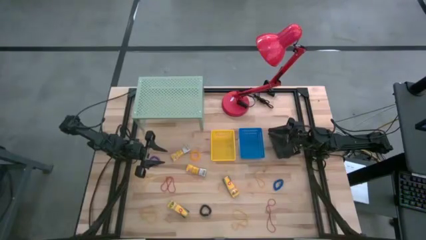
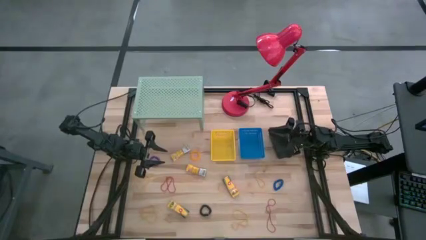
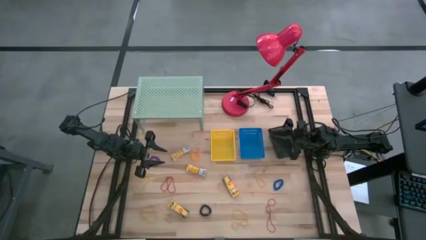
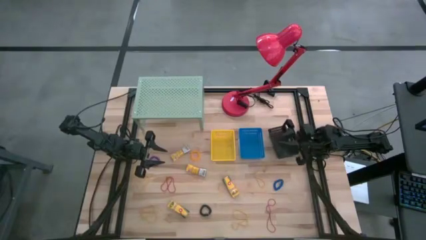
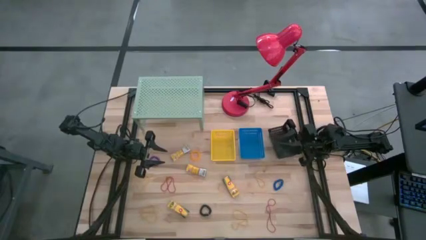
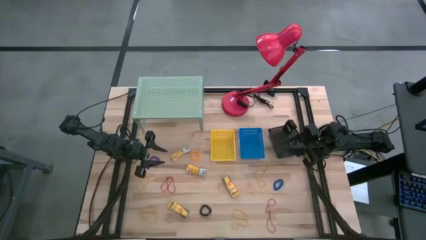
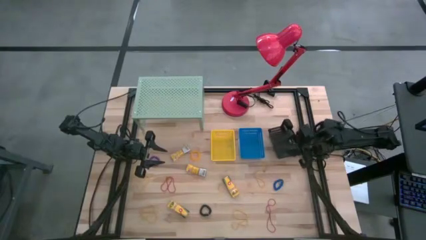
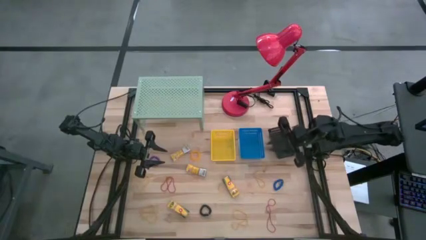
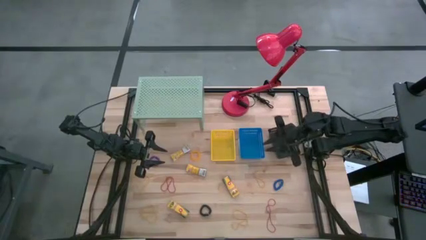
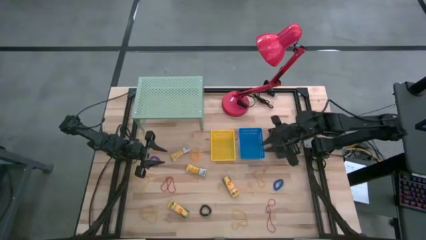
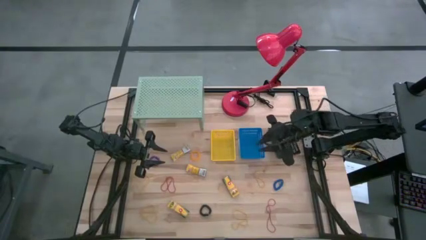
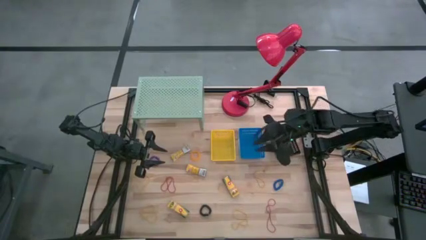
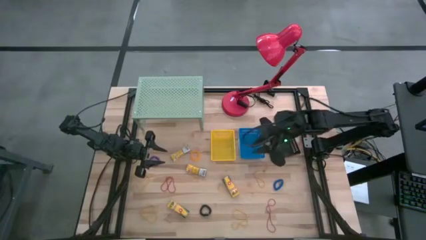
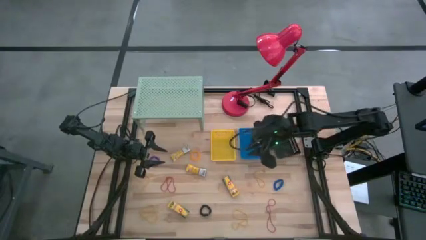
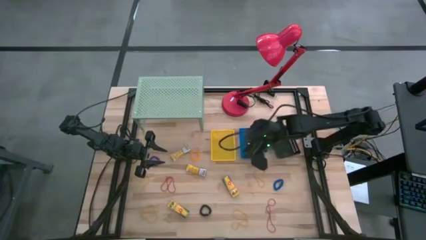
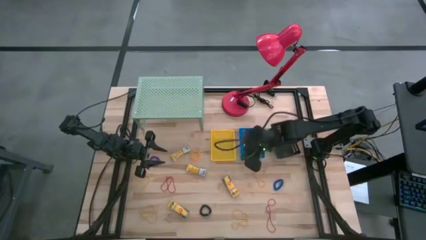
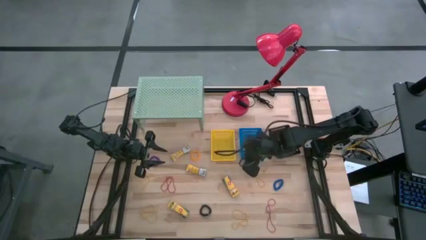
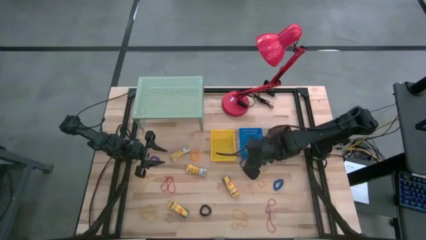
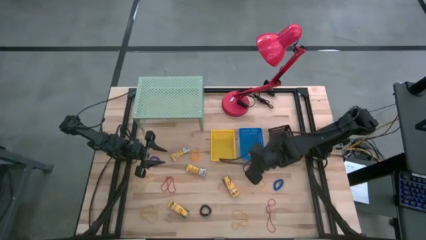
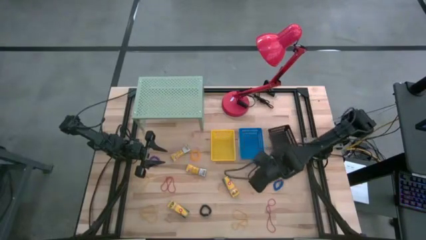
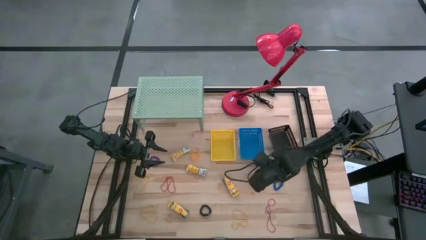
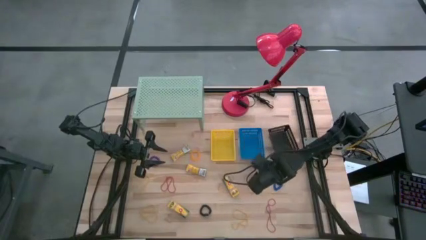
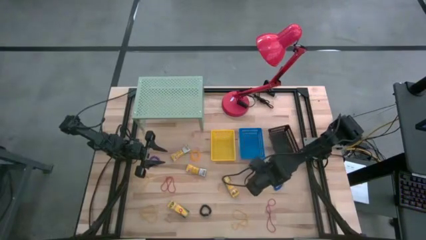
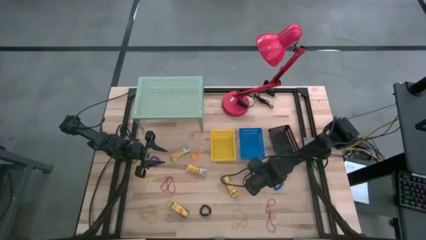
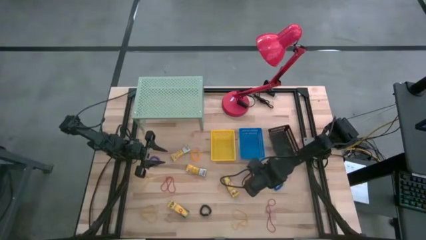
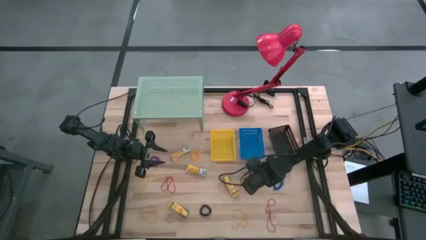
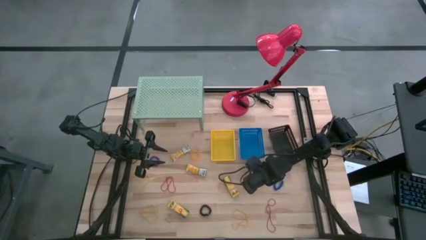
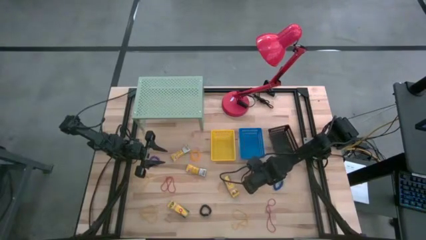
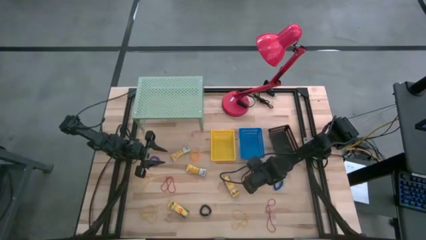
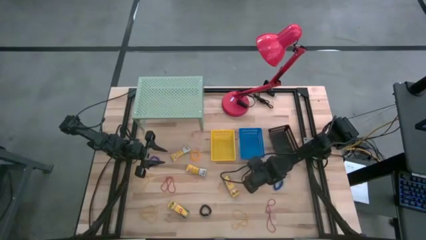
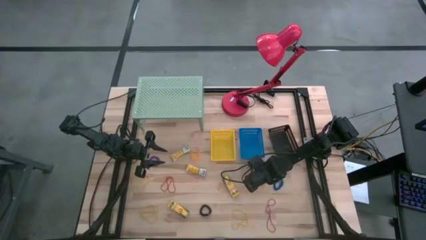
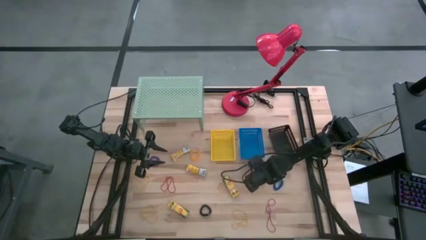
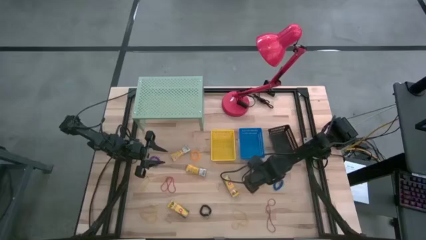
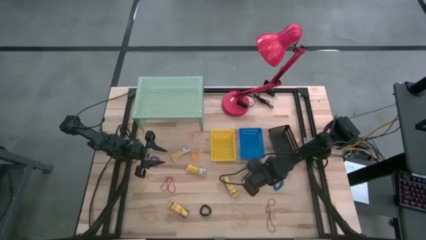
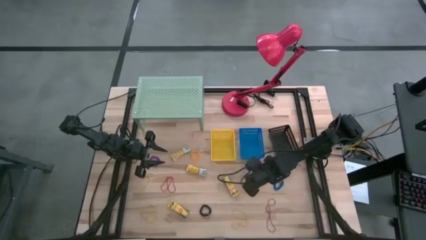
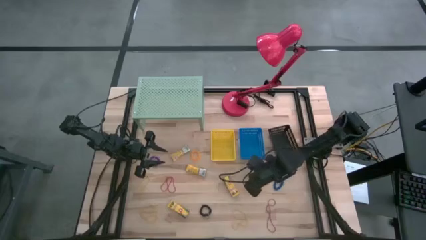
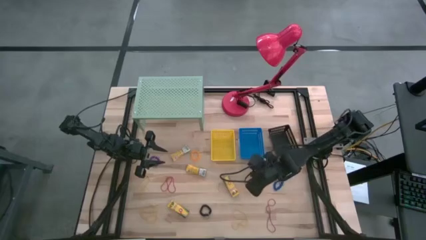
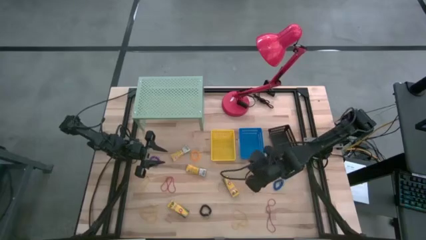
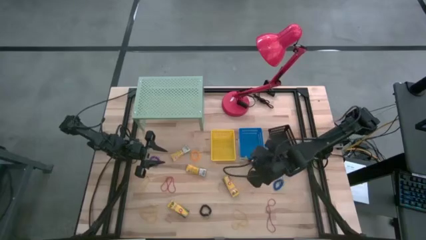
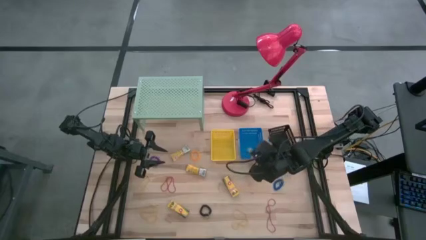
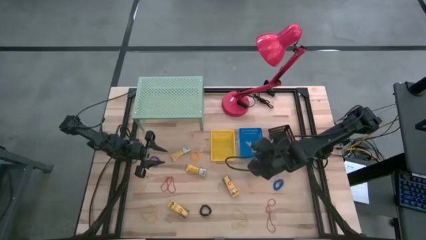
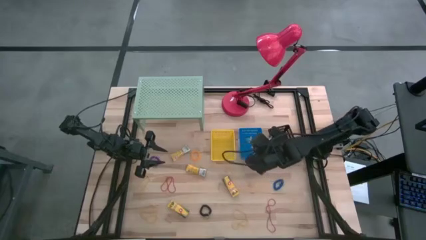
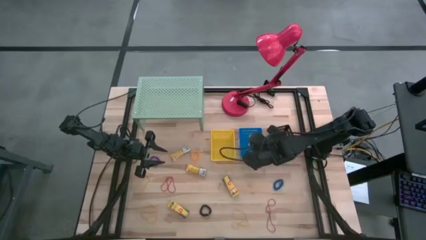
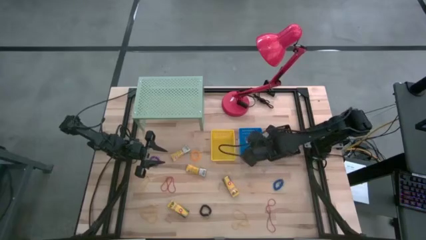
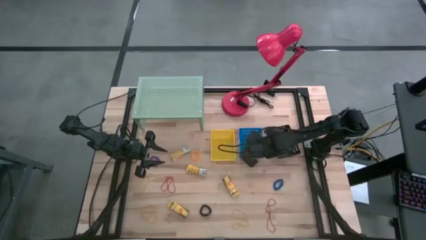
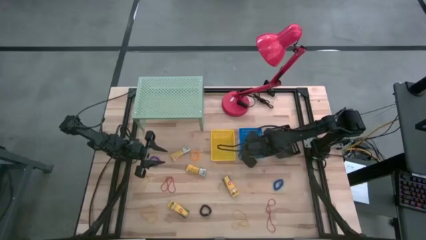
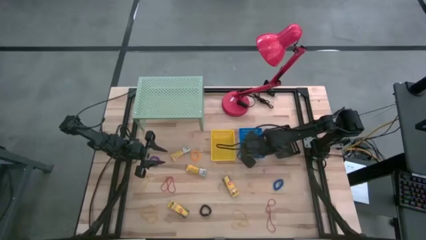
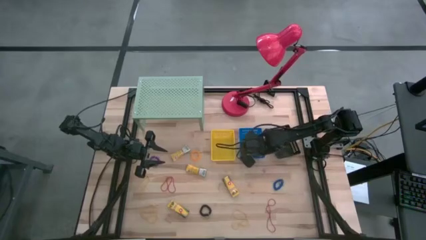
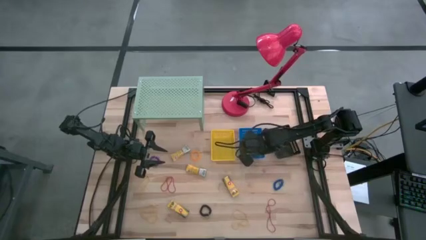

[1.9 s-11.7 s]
Task: Pick & Place Office Desk Supplies
Put the top right yellow rubber band into the blue basket

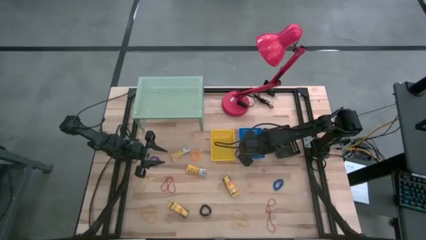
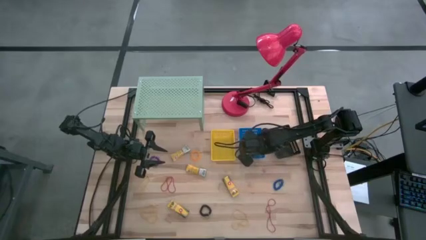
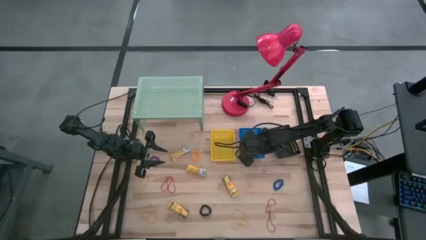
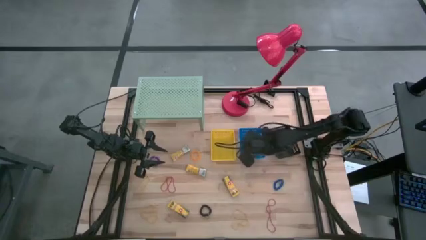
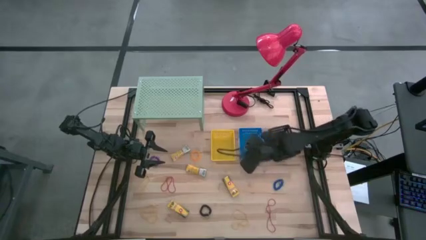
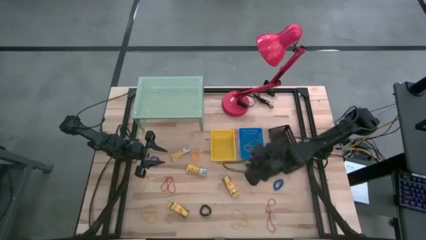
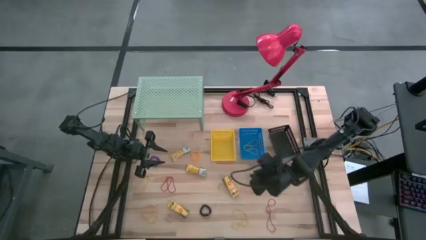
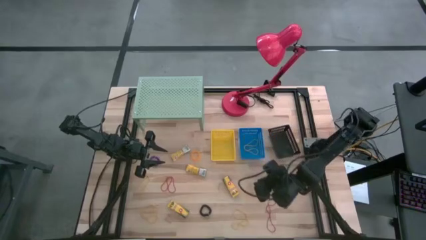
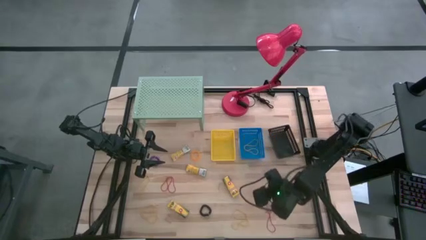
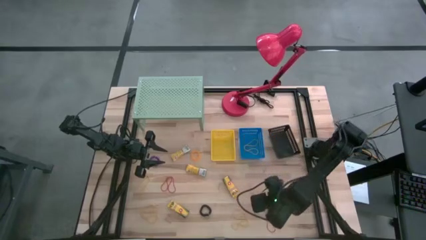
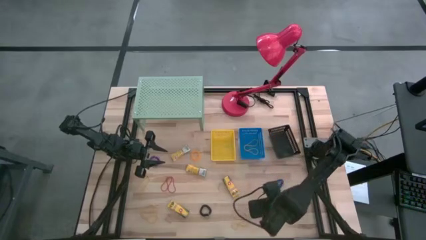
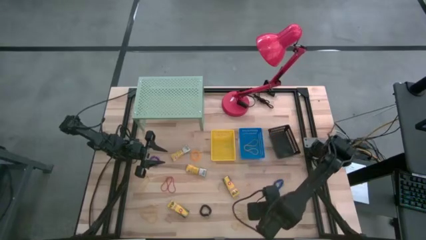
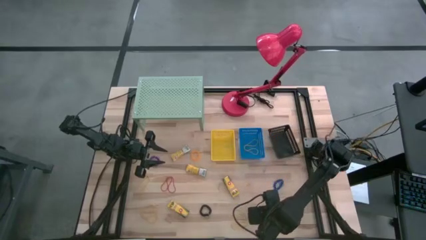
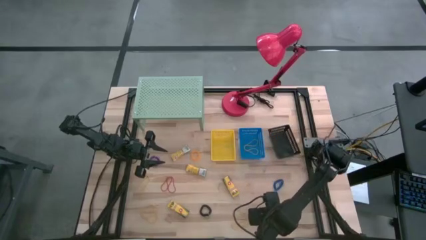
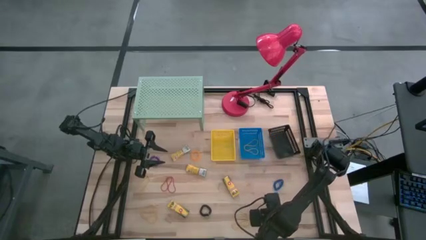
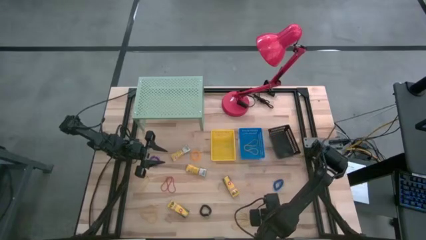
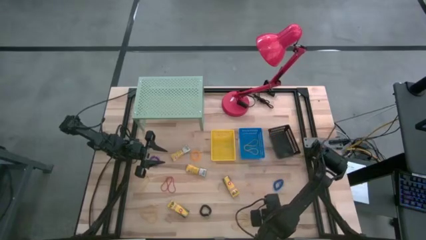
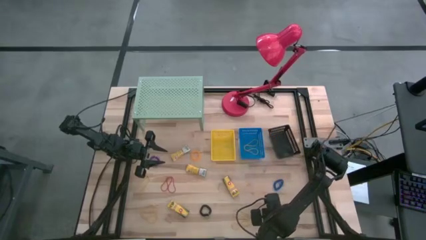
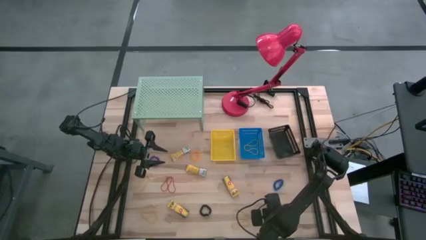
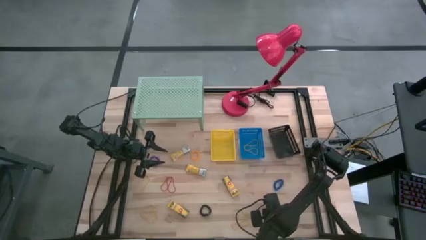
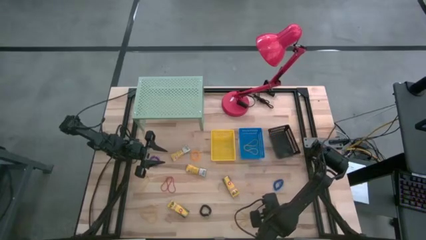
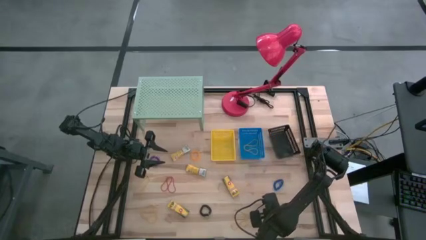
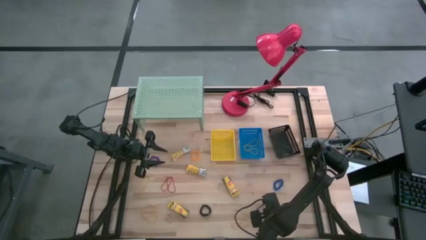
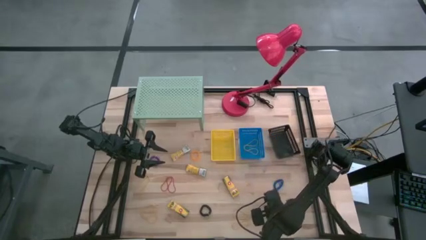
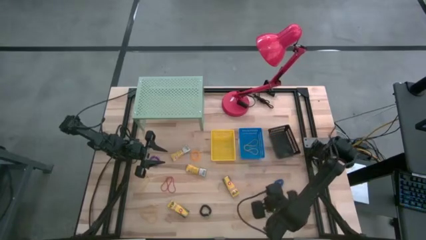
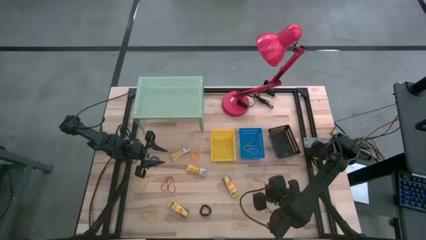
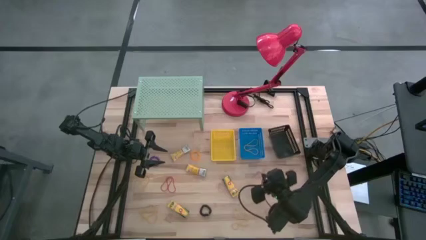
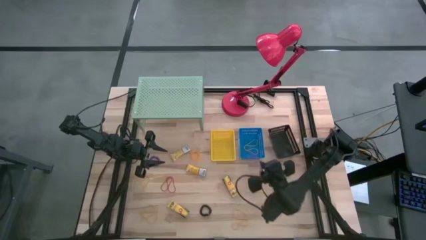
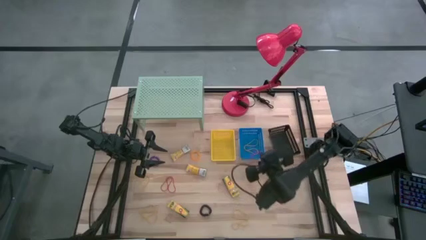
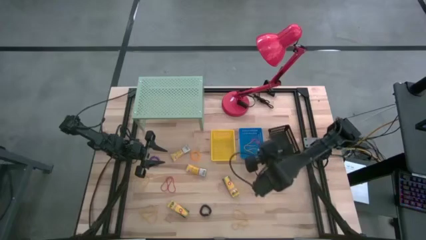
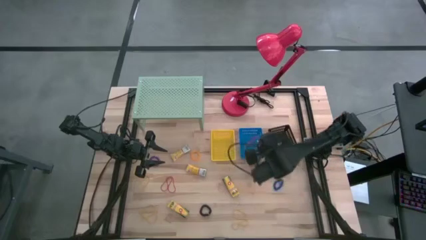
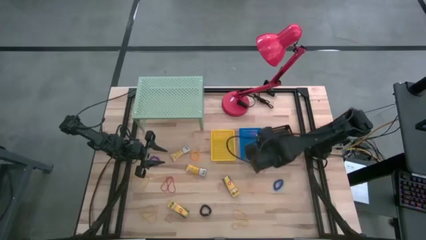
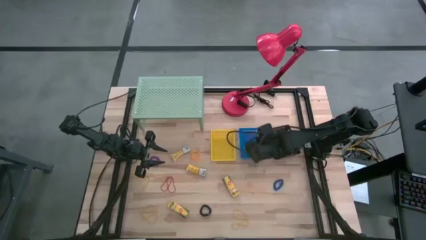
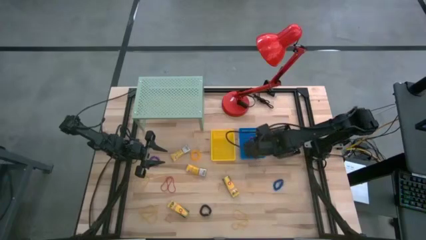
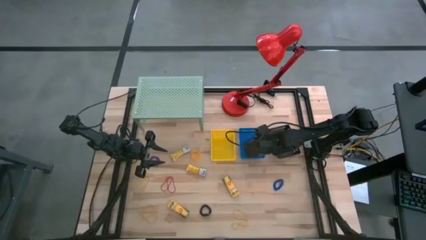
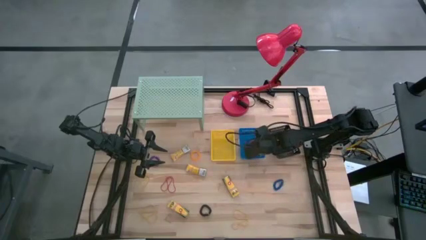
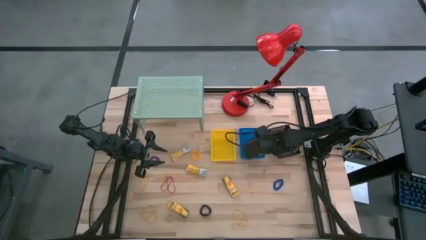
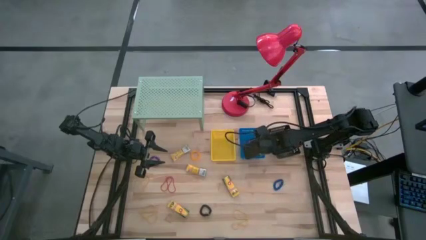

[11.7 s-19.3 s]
Put the right red rubber band into the blue basket
